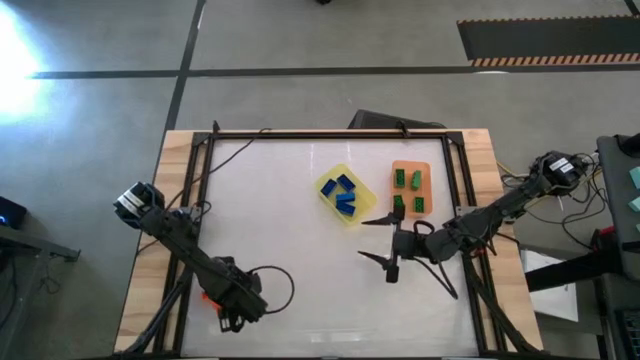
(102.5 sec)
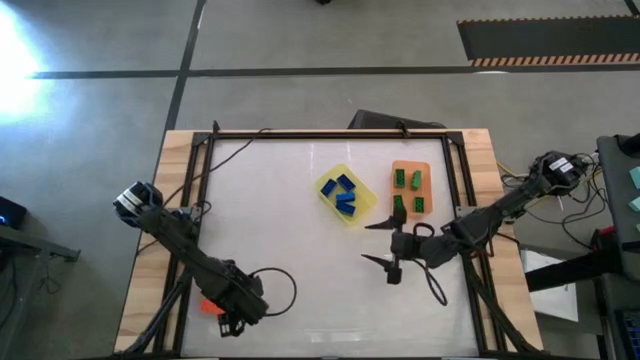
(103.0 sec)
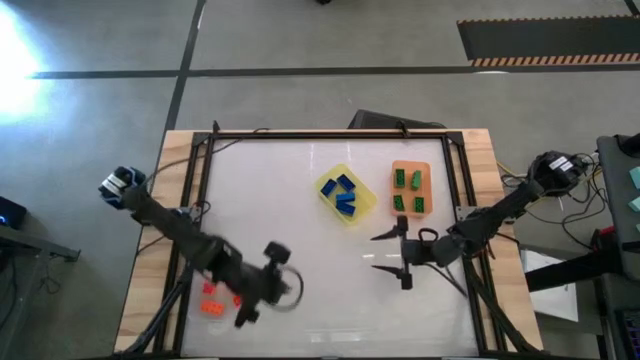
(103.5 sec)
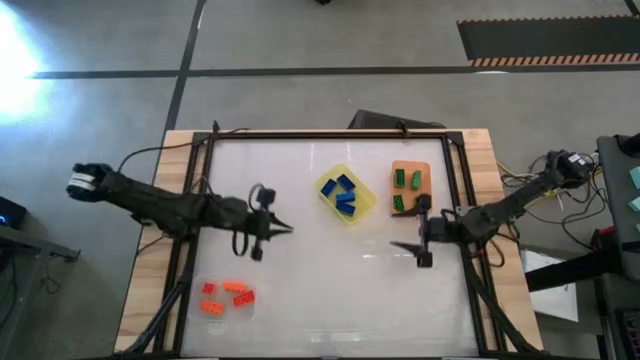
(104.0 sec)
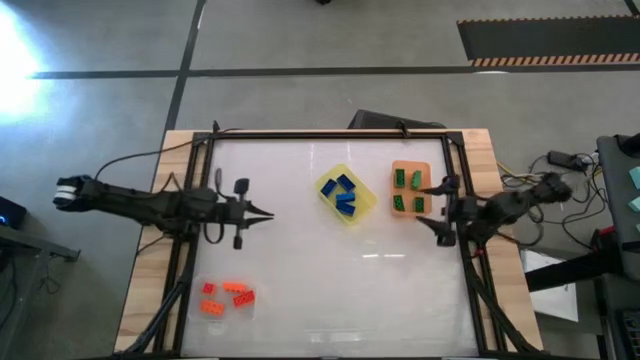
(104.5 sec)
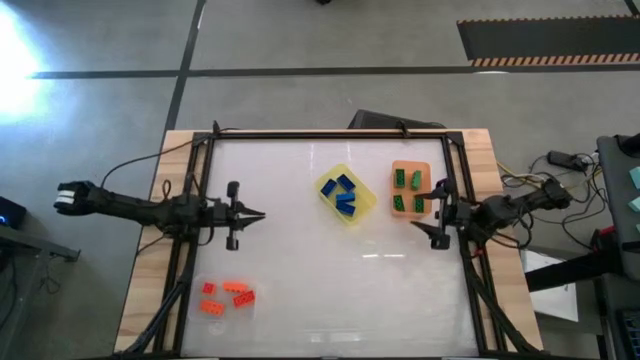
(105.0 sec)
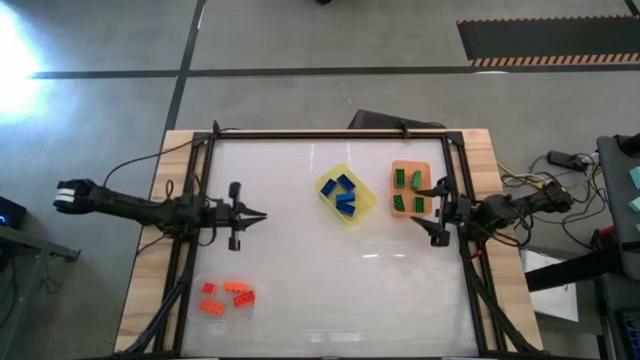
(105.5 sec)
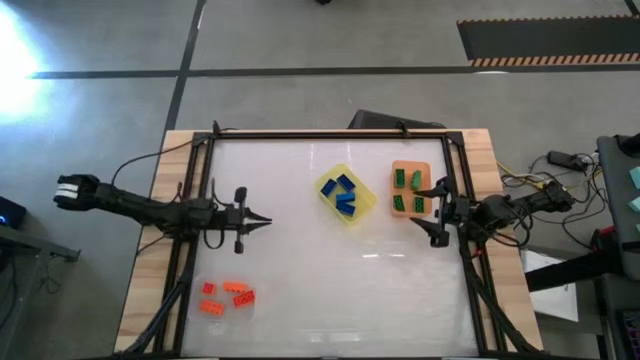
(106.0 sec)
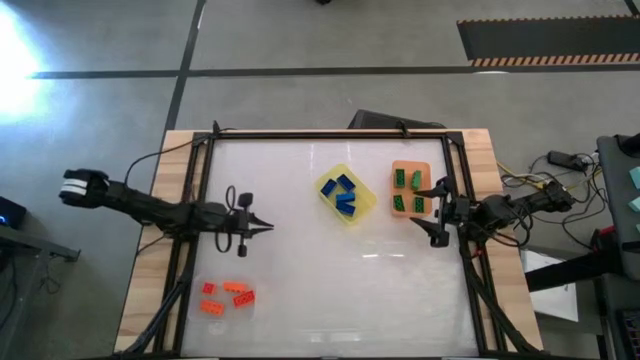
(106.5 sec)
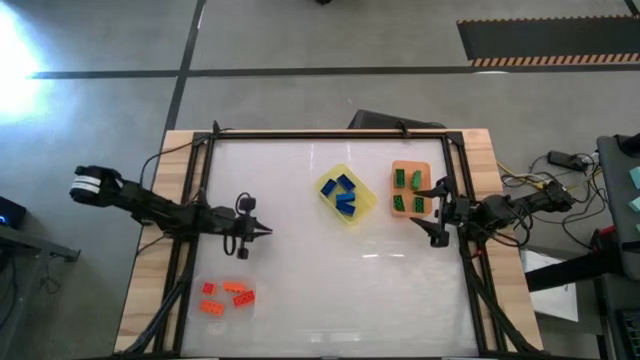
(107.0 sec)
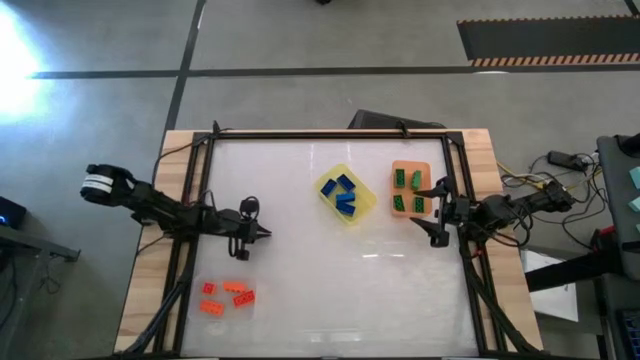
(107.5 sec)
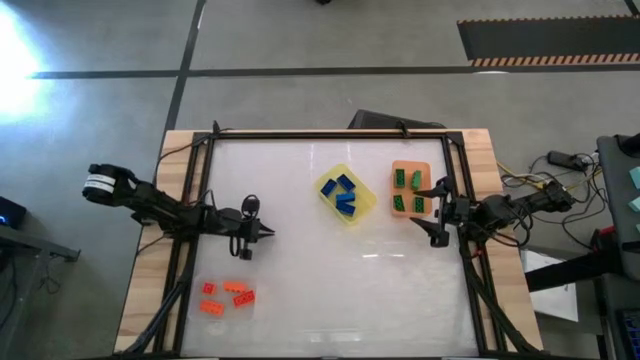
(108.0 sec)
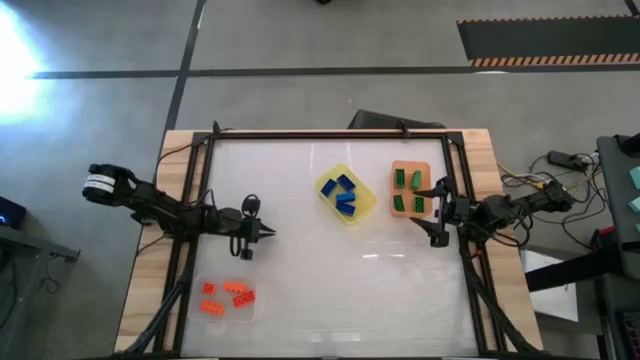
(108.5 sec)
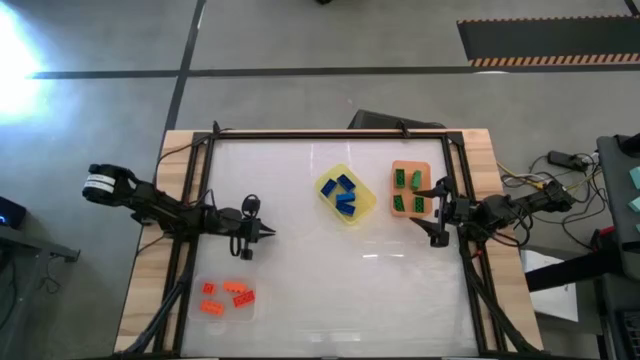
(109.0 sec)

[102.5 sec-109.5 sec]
Task: Sort & place blocks by color
Return to Home Position

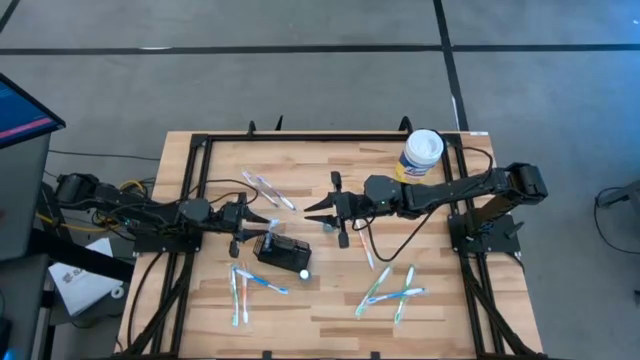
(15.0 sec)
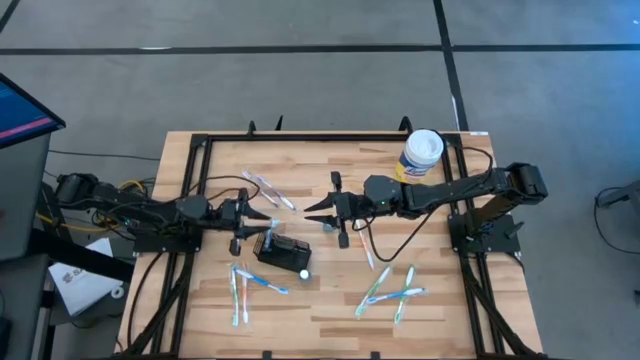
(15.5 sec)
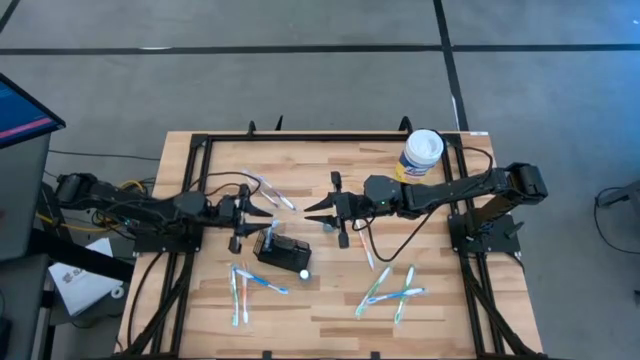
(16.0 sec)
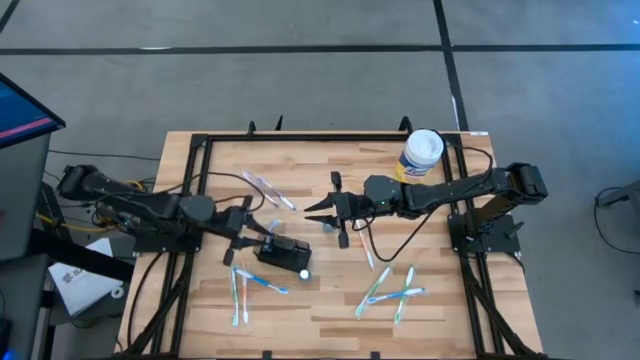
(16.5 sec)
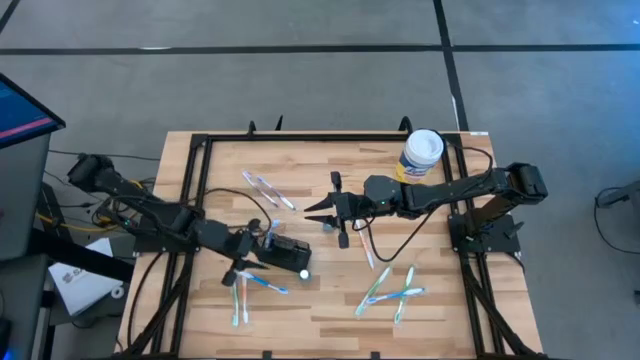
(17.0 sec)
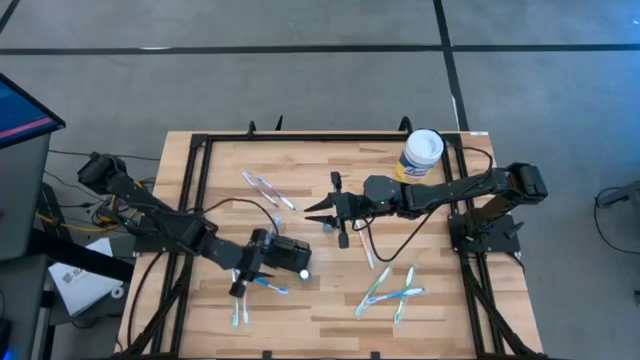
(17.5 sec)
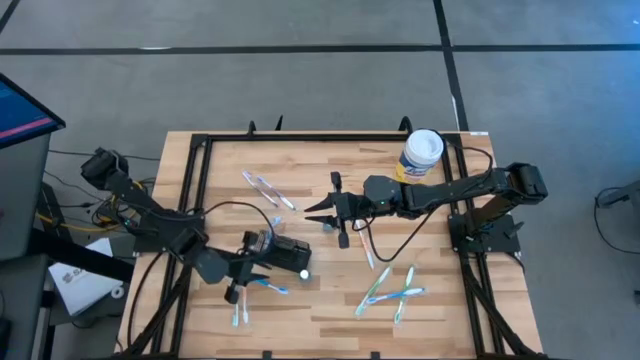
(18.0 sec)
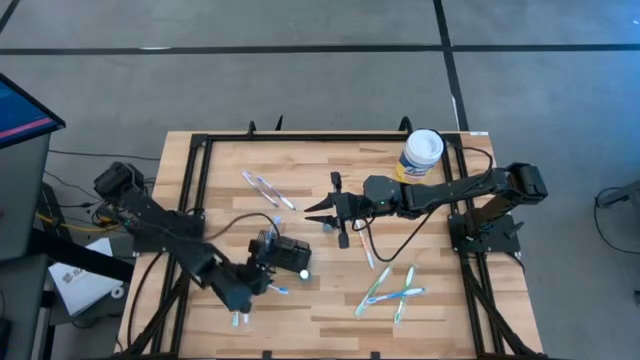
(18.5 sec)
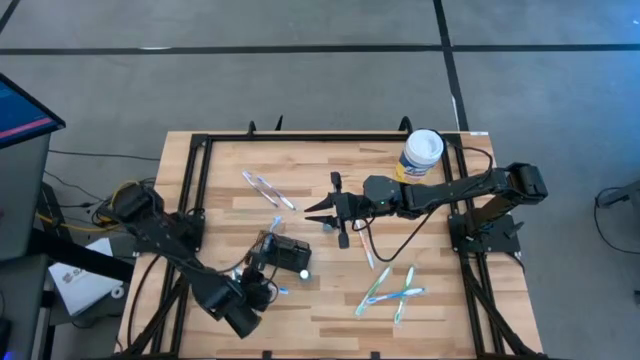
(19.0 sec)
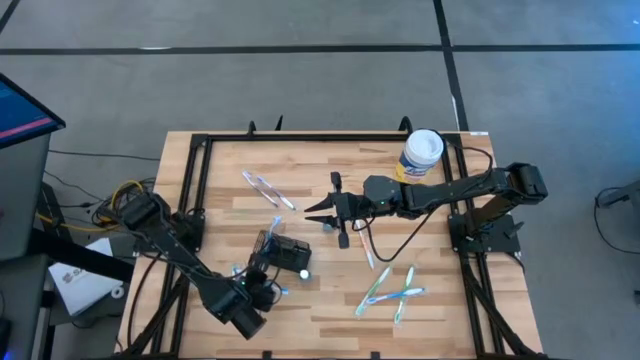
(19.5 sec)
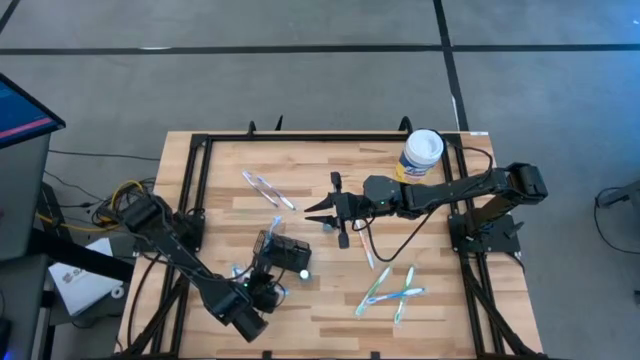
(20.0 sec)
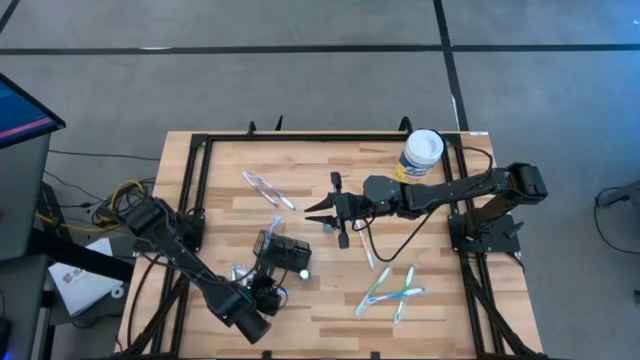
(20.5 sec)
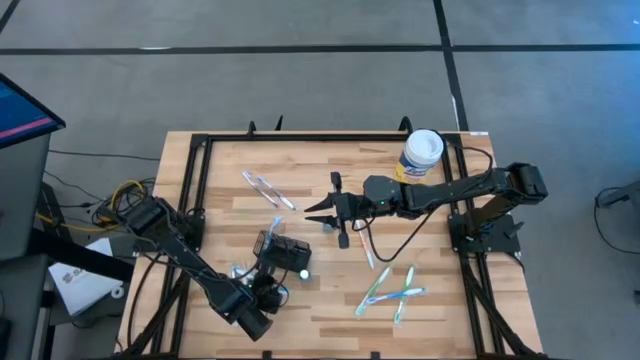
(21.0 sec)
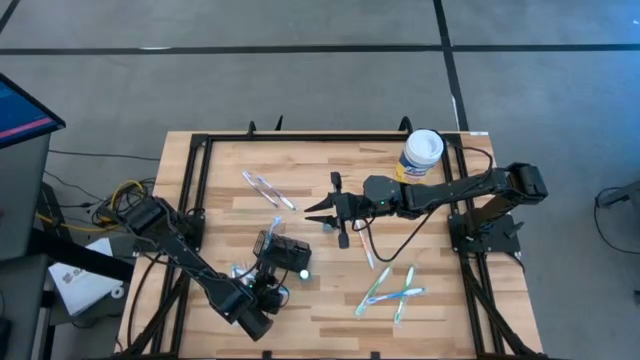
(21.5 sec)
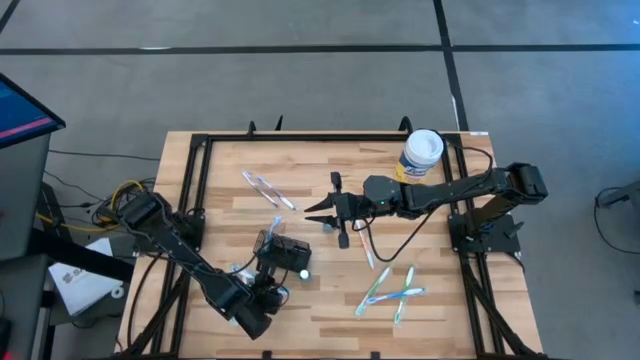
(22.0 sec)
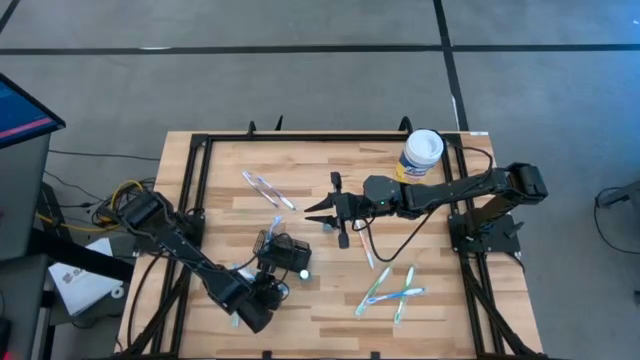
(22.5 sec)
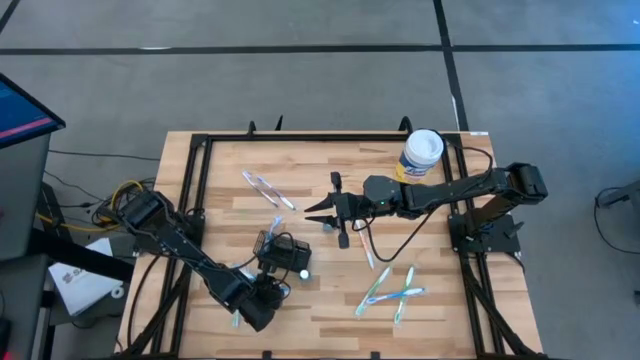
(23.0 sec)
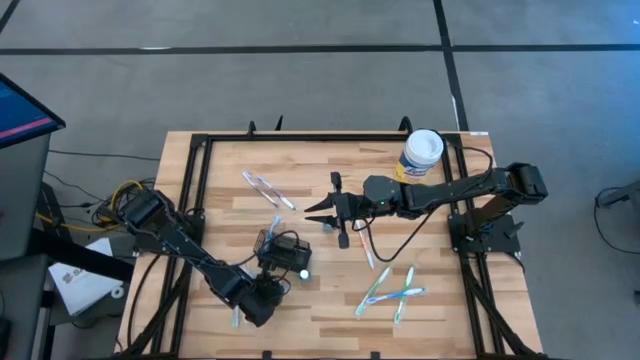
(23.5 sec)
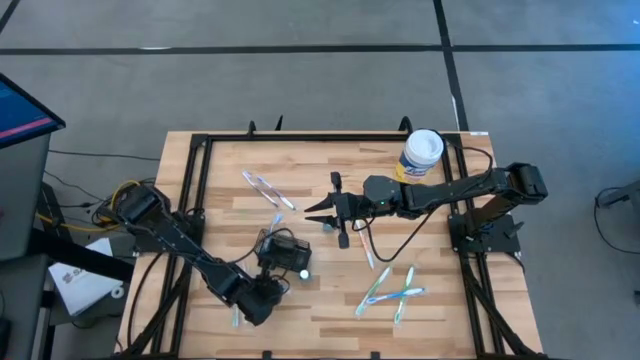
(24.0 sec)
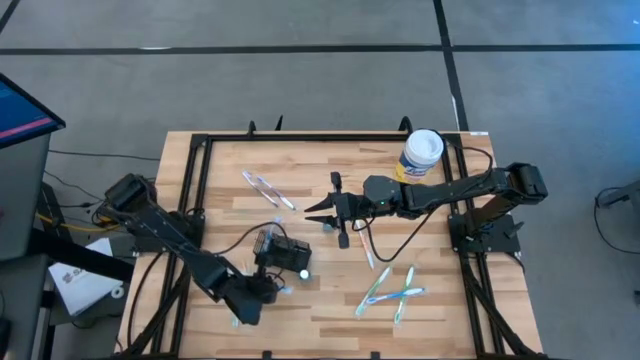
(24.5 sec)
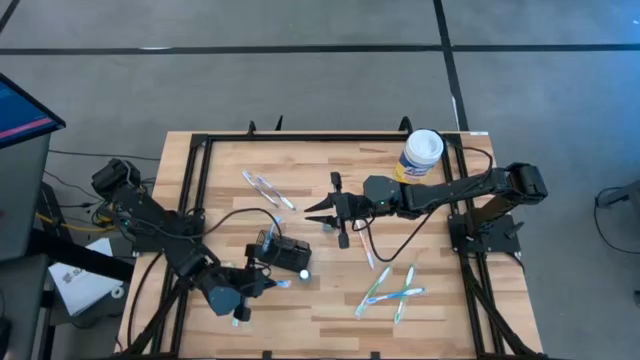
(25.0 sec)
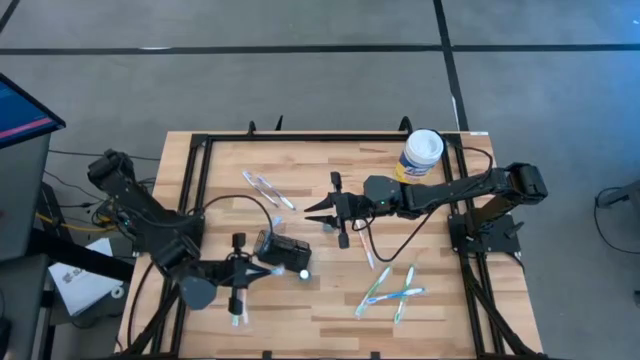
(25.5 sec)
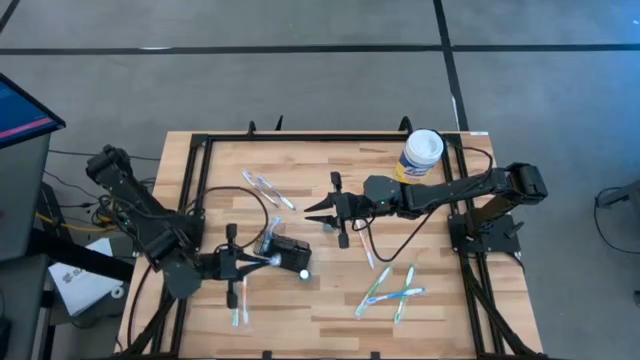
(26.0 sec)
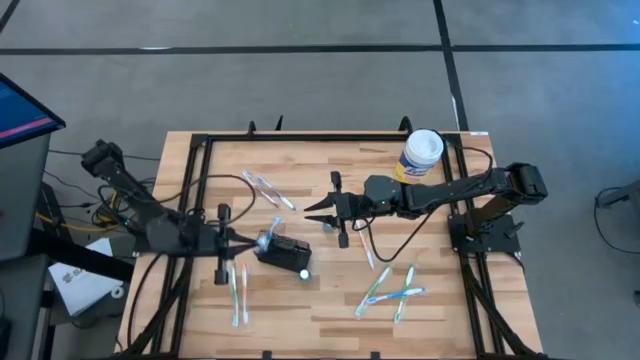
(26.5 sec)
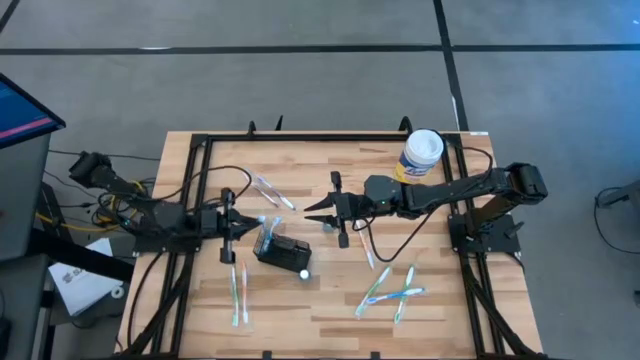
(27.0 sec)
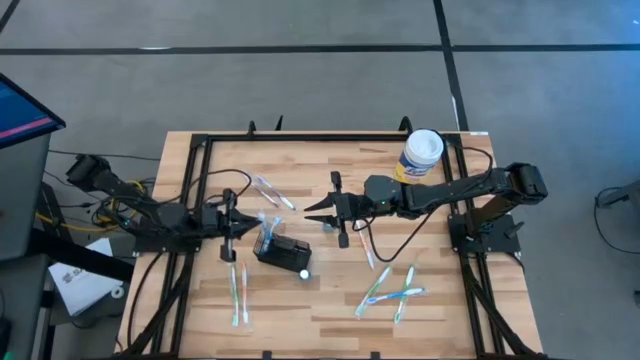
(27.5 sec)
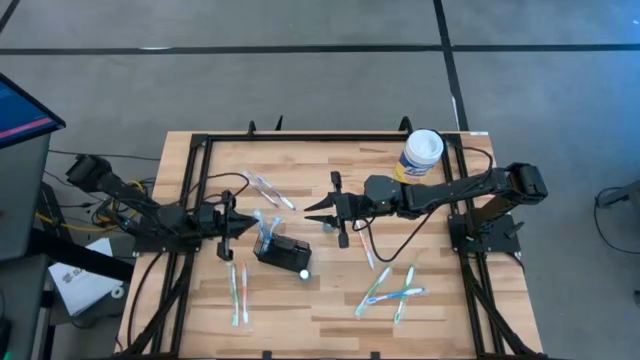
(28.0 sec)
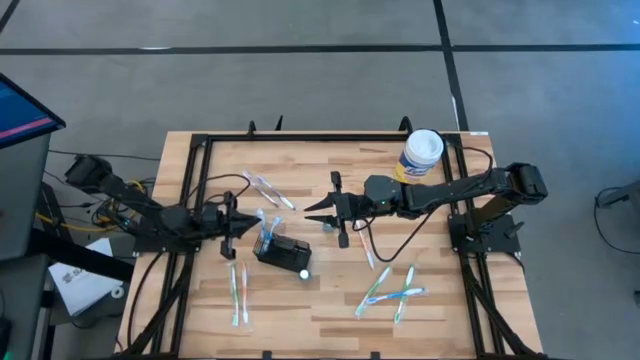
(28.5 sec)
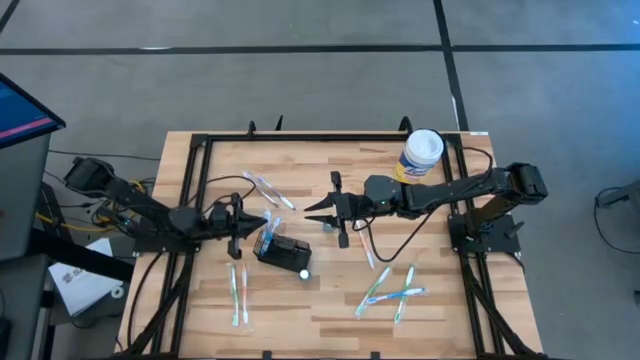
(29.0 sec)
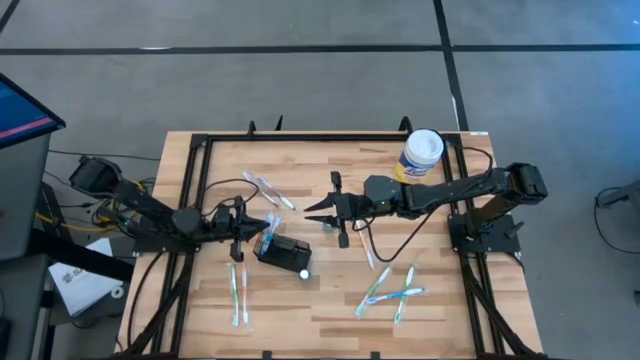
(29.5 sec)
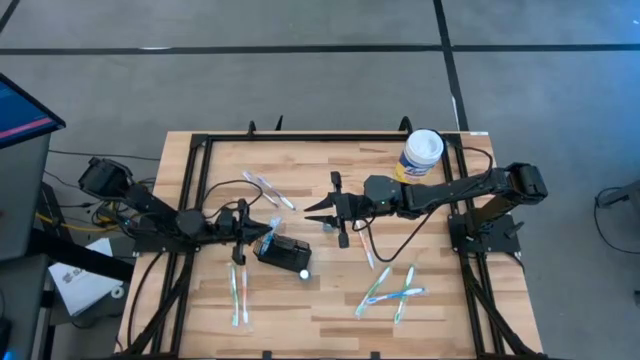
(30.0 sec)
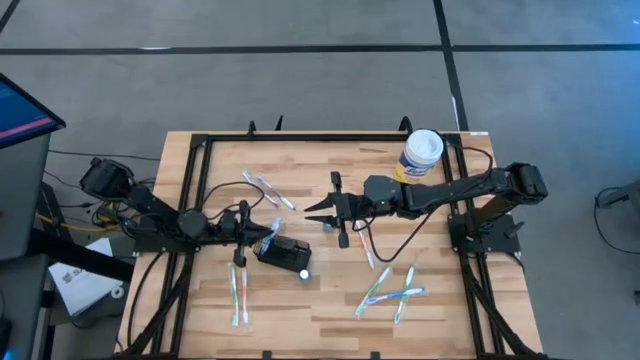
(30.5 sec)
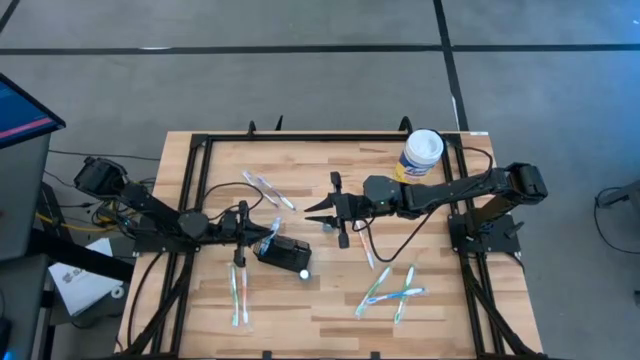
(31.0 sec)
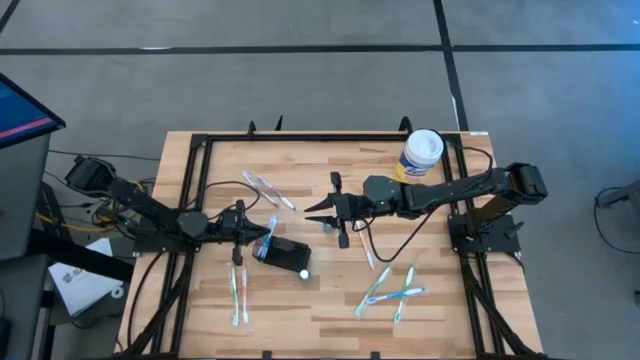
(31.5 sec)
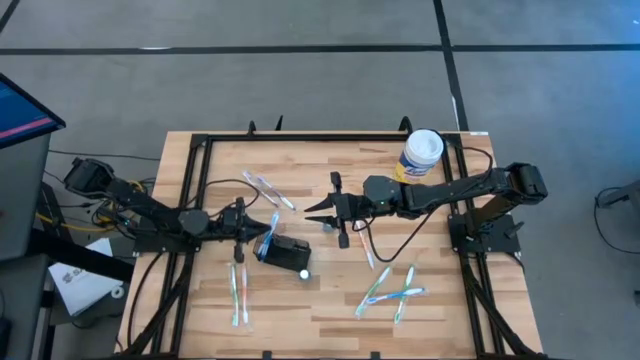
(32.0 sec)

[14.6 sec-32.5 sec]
Task: Pick & Place toothbrushing station
Put the left blue toothbrush into the left compartment of the wire organizer
